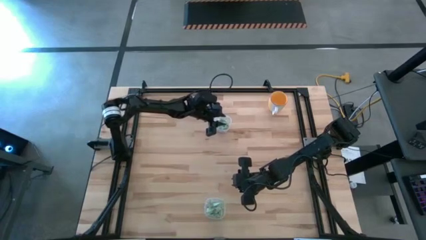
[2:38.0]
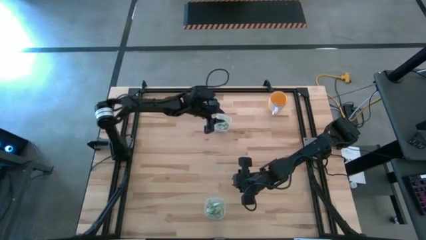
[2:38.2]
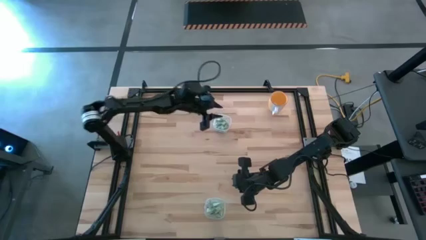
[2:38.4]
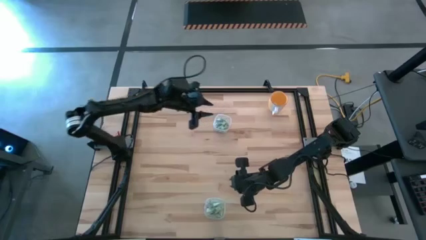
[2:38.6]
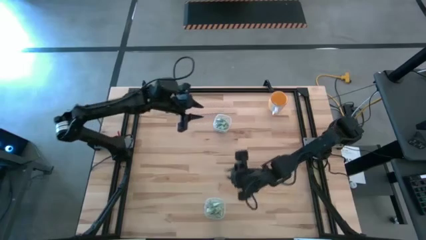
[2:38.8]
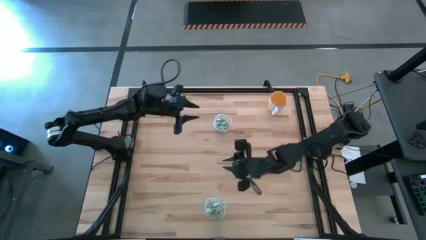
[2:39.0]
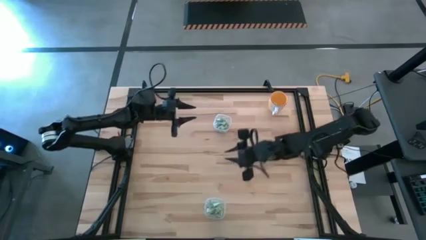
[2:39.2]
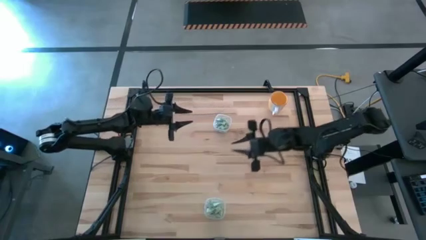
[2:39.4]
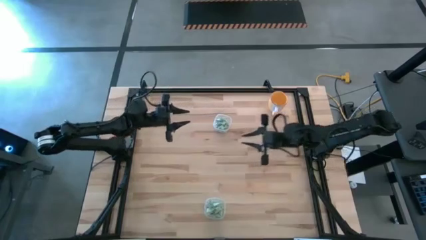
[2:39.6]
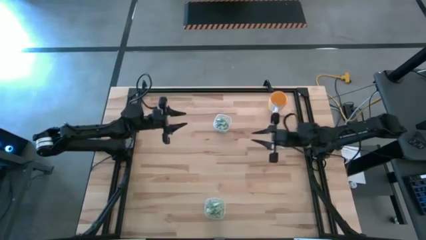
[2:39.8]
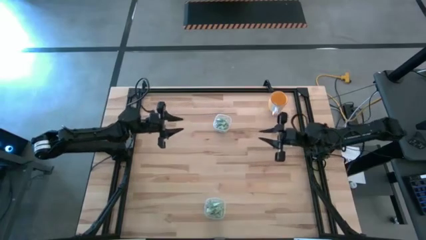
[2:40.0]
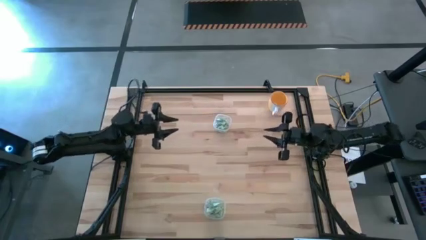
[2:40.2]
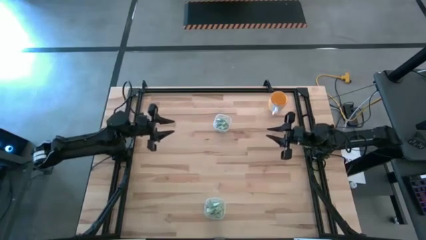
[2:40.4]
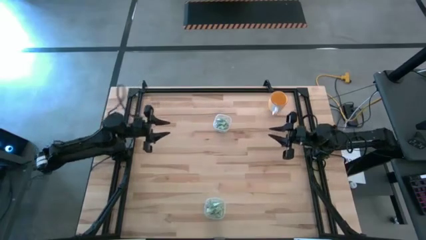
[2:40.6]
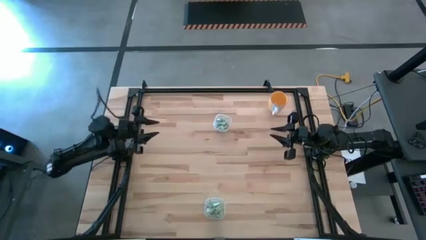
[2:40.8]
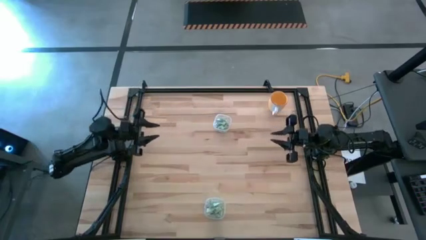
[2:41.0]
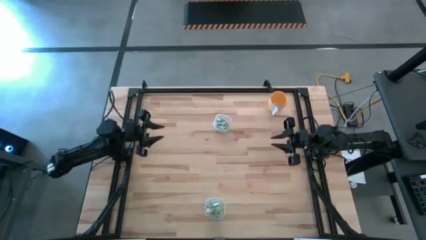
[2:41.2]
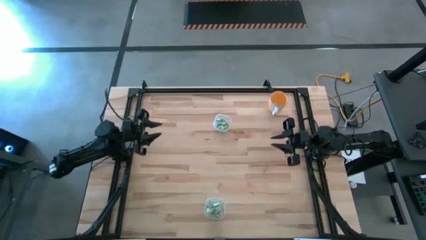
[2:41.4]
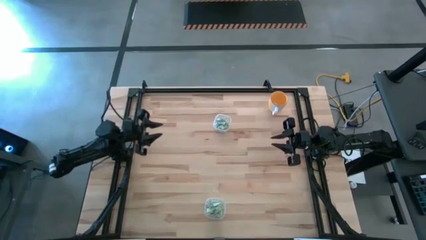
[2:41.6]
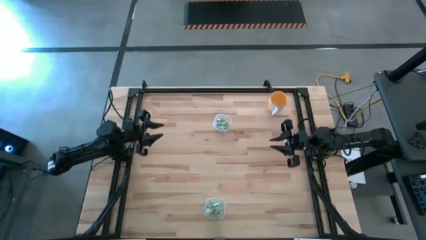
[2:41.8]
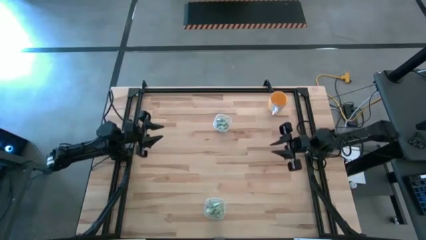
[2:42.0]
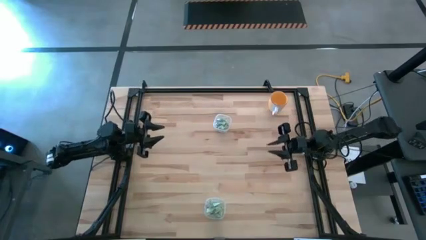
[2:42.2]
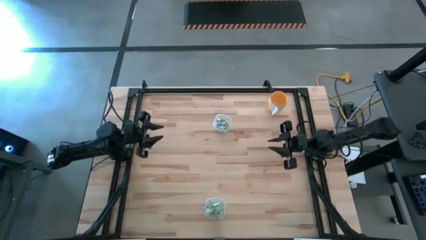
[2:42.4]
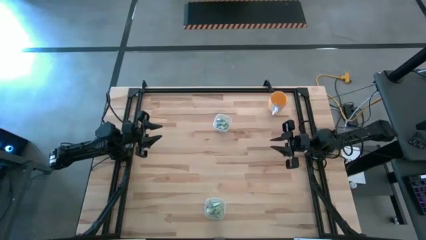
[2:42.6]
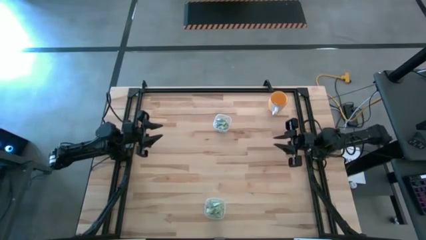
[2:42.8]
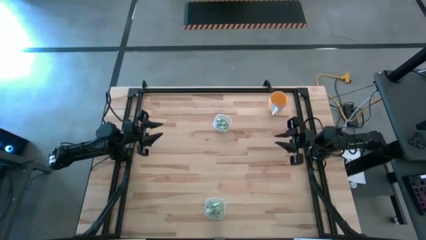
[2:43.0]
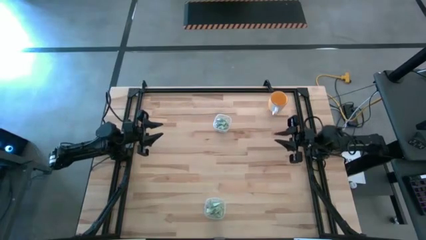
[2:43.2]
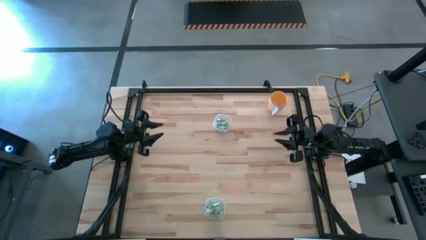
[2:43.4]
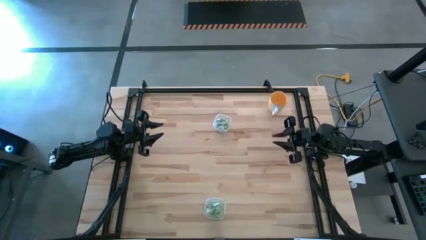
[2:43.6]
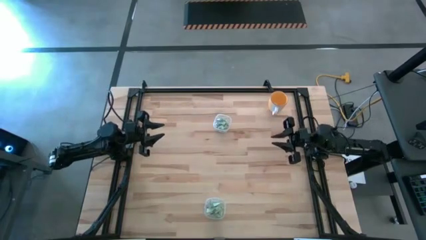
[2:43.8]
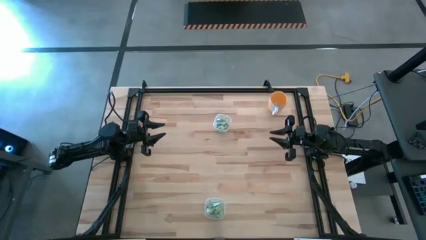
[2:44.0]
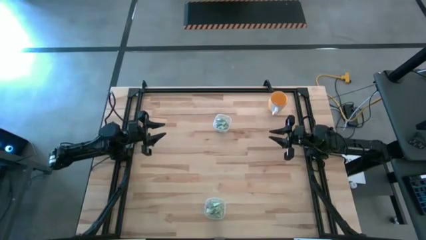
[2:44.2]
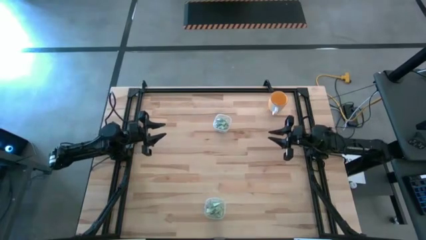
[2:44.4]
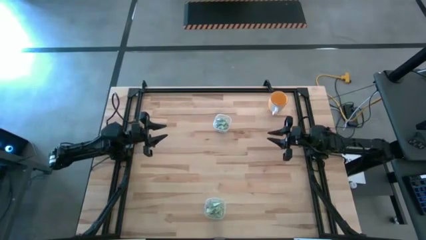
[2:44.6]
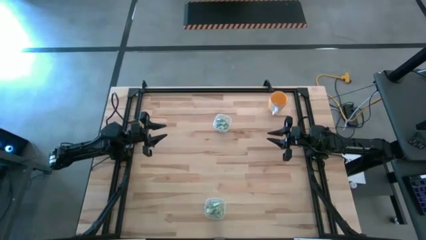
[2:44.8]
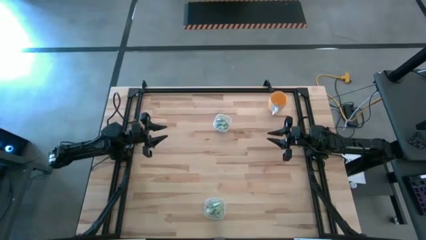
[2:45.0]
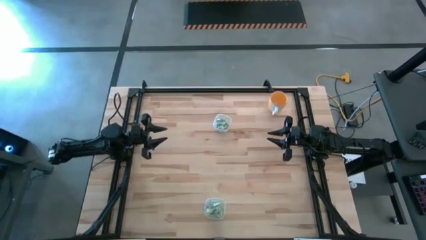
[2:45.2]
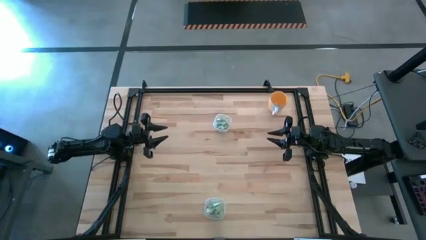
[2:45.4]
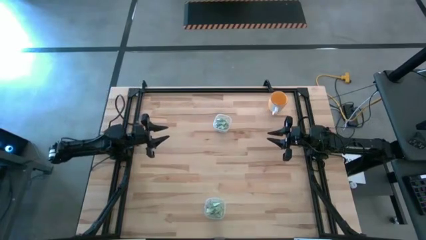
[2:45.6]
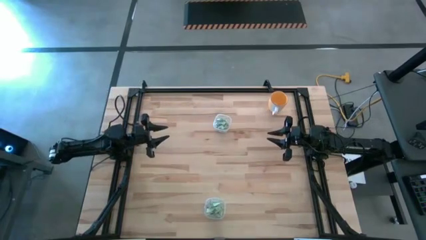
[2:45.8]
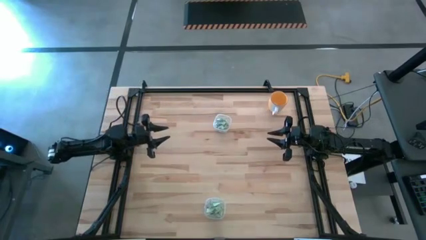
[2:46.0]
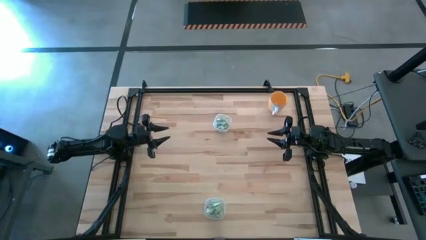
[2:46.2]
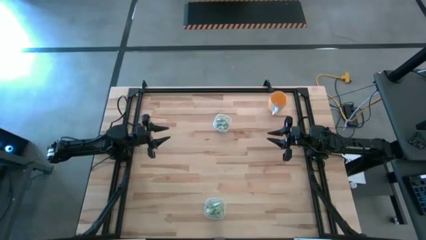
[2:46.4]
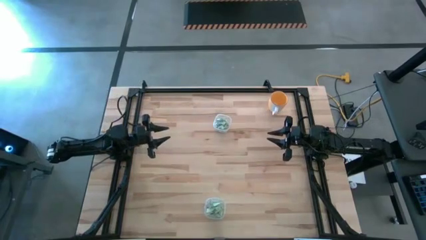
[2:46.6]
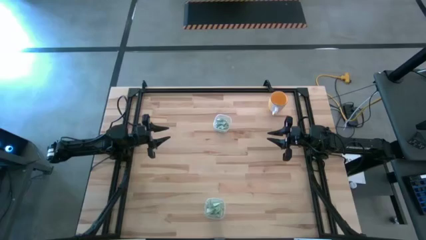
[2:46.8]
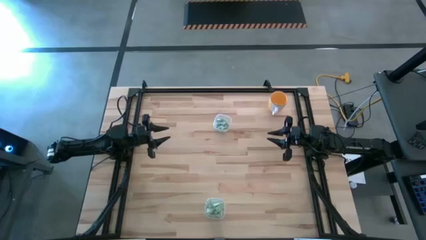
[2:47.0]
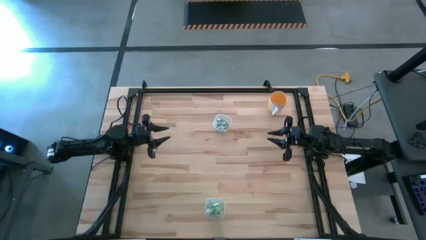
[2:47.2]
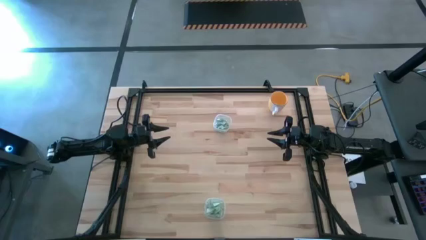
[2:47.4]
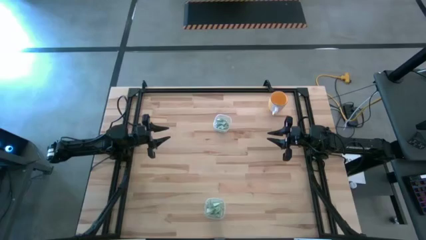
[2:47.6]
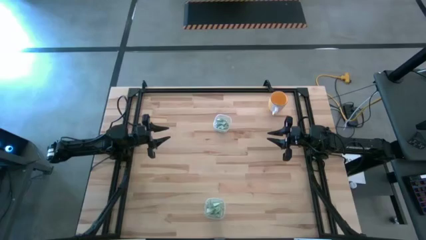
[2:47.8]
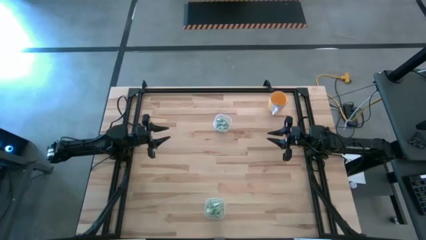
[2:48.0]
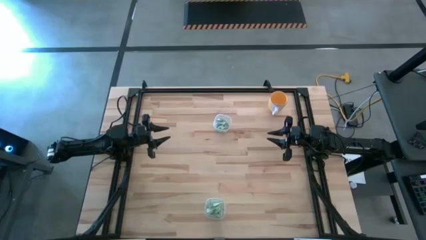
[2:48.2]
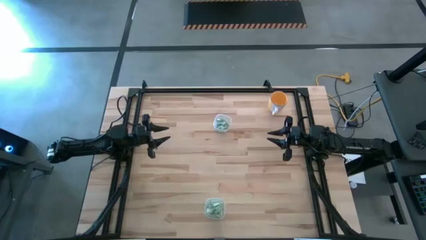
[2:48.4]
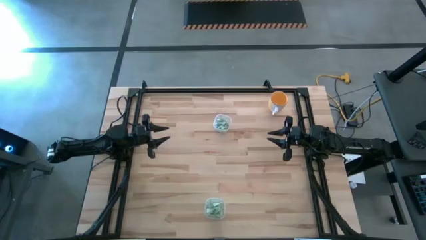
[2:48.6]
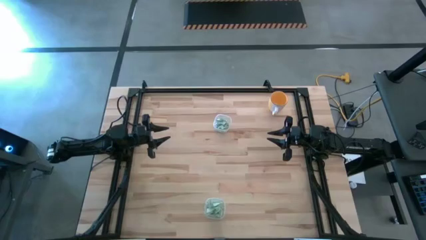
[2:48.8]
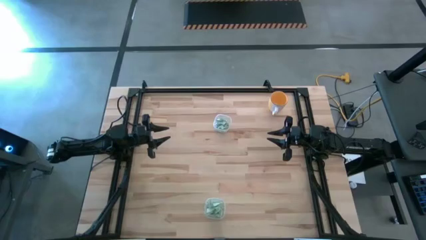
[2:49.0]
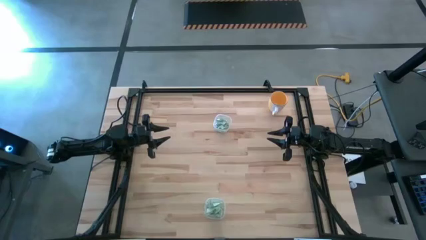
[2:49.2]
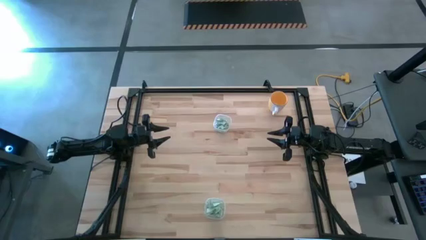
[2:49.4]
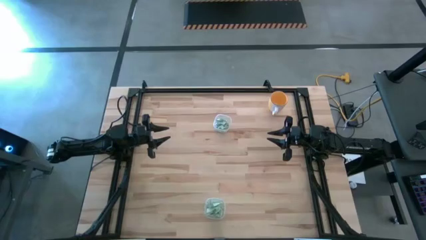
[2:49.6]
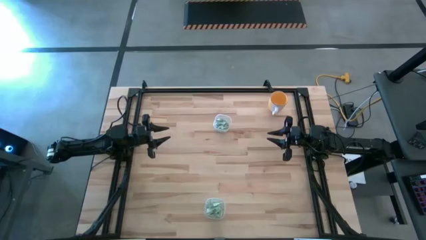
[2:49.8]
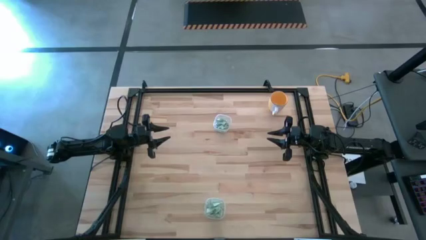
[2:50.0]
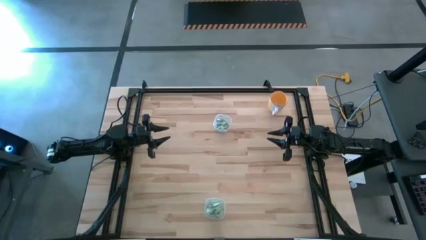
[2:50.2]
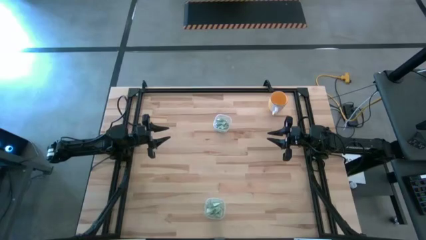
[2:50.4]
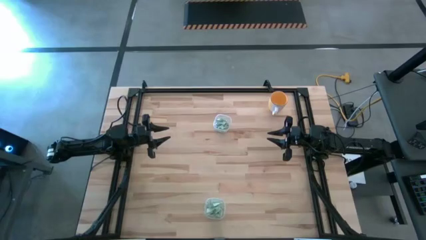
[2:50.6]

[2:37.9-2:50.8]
Task: Pick and place items into bin
Return to Home Position

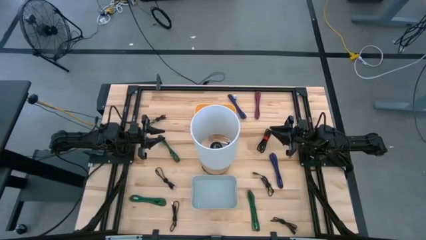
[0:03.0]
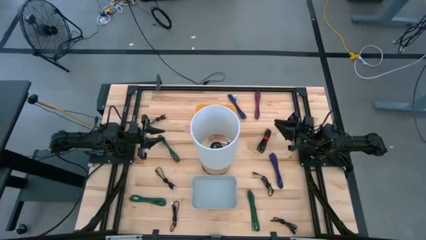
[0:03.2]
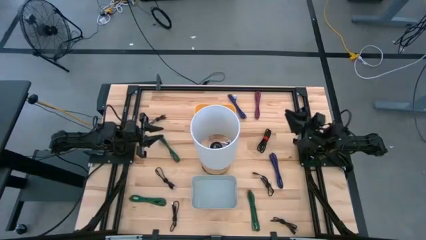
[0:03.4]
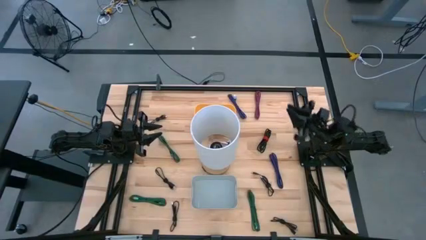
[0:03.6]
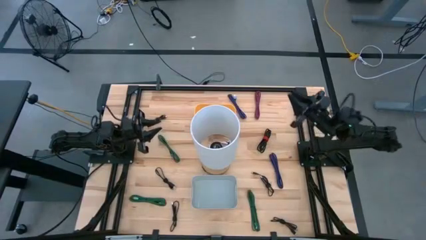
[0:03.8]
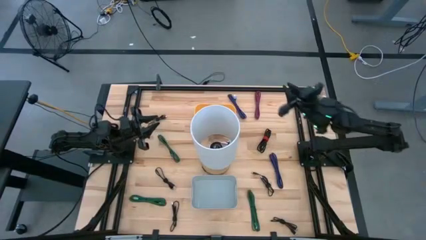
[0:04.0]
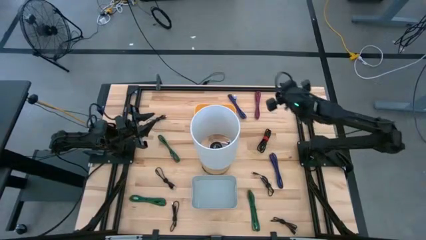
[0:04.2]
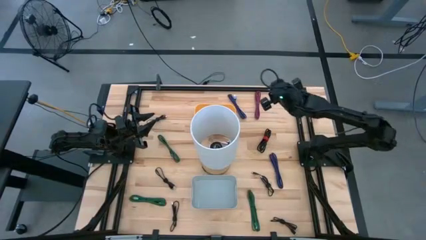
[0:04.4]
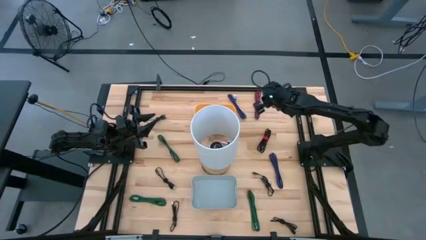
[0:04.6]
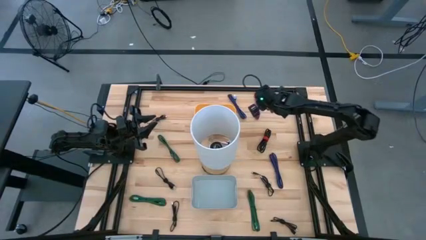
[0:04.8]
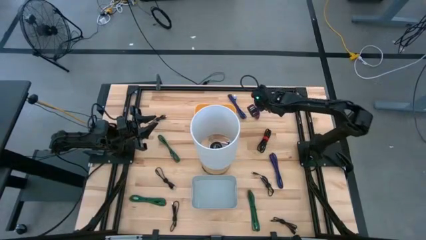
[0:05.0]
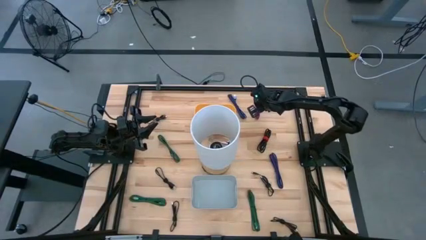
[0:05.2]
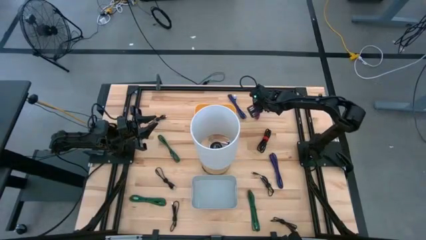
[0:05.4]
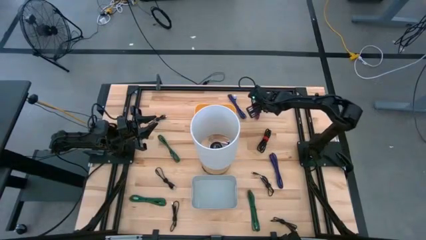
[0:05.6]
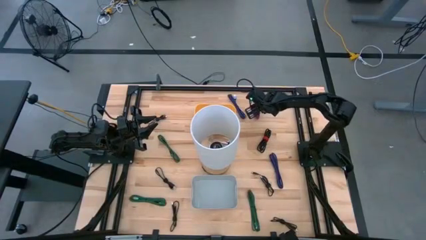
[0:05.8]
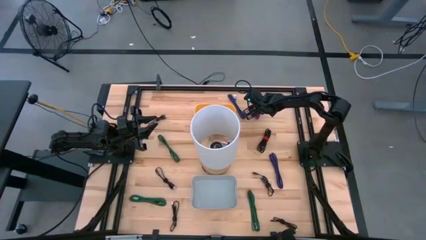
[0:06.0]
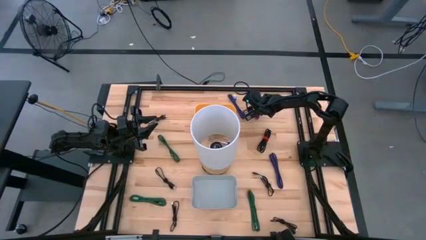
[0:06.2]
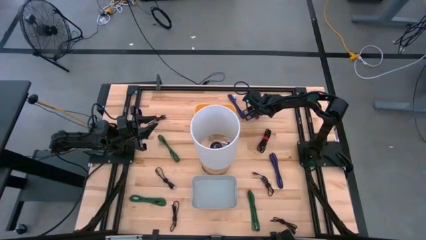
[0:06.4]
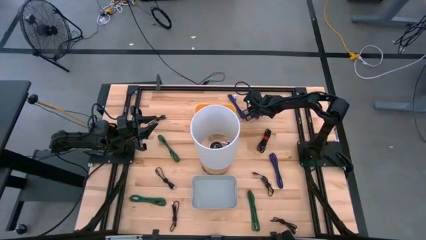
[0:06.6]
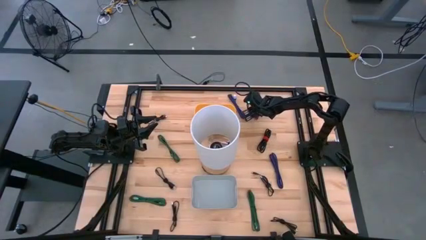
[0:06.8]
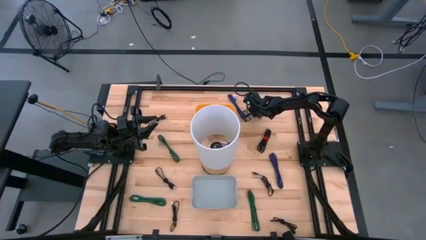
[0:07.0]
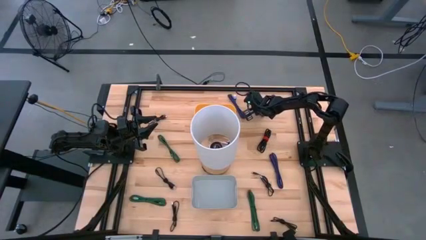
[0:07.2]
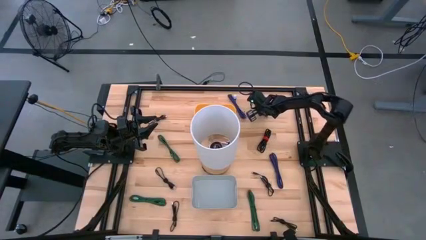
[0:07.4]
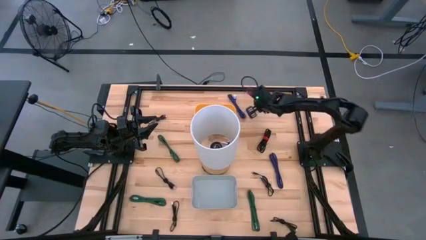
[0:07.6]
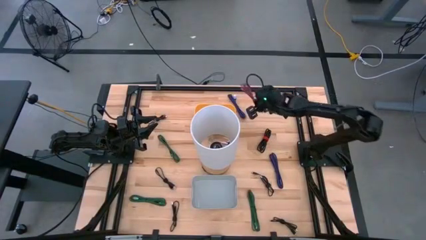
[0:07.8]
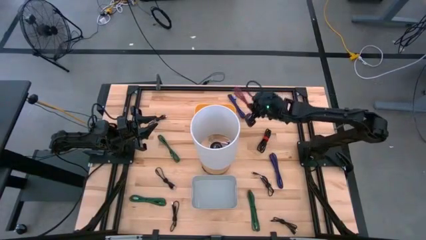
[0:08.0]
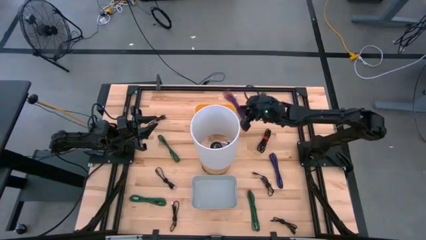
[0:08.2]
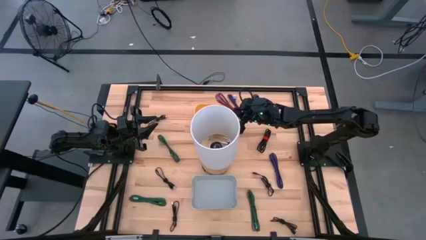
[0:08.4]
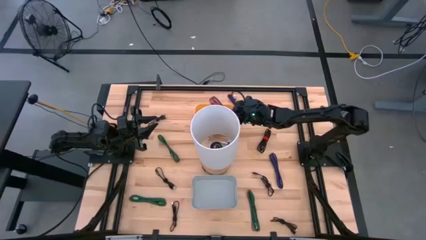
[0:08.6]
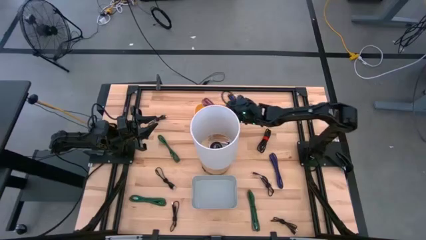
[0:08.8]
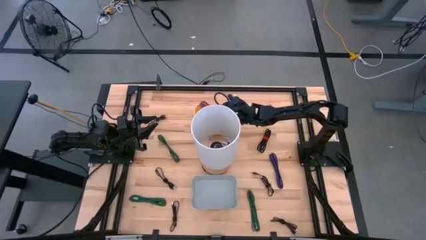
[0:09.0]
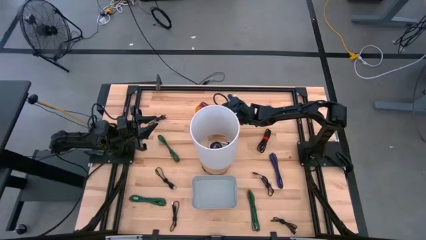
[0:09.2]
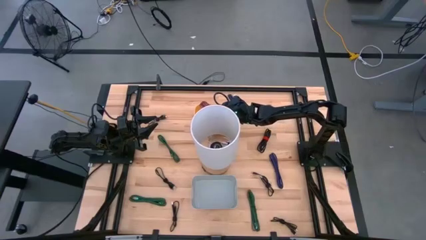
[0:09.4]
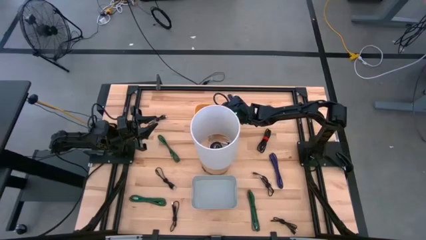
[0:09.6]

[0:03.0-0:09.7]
Task: Pick & Place USB Port
Put the pink charger cable into the yellow bin
